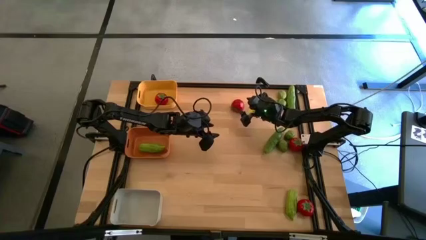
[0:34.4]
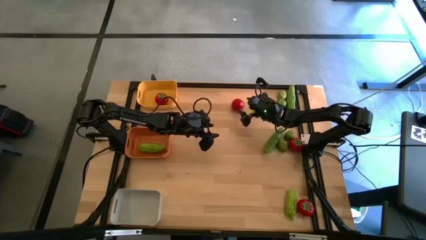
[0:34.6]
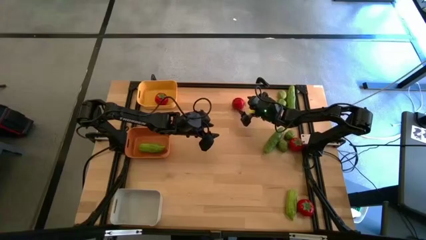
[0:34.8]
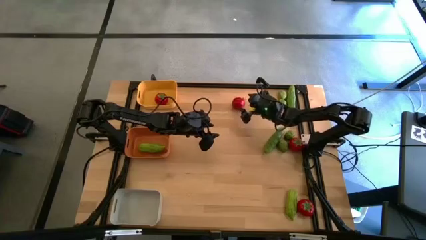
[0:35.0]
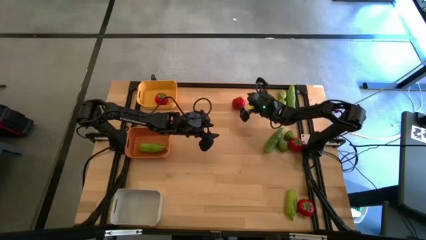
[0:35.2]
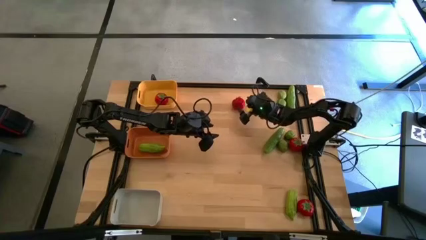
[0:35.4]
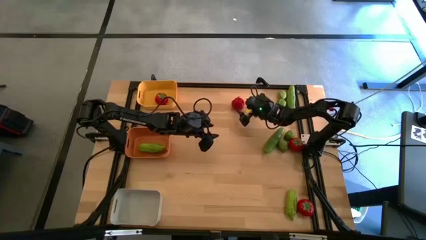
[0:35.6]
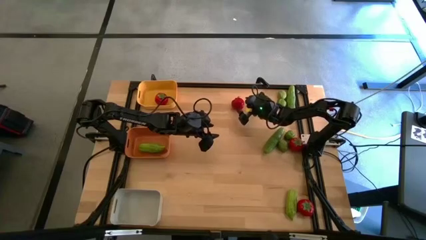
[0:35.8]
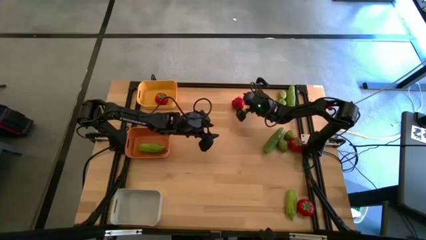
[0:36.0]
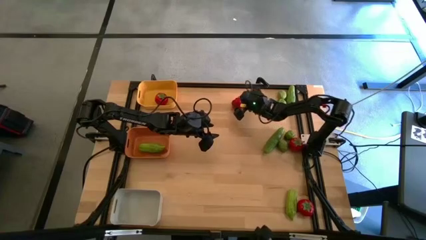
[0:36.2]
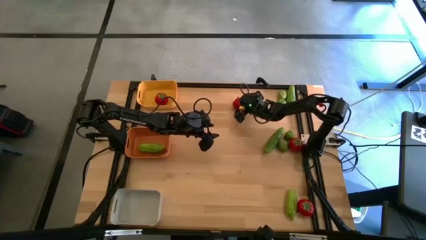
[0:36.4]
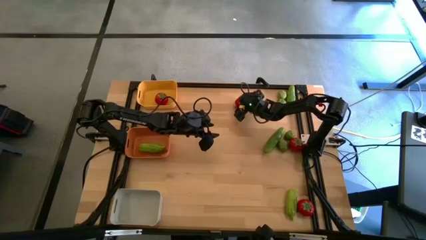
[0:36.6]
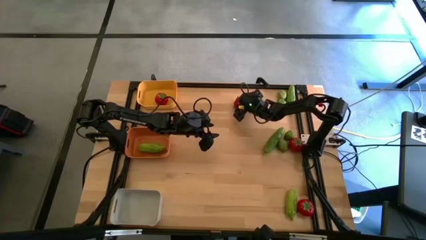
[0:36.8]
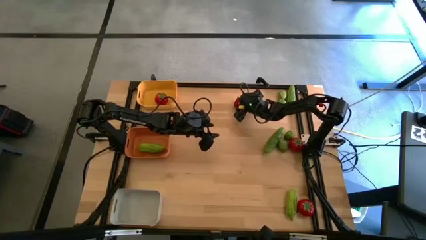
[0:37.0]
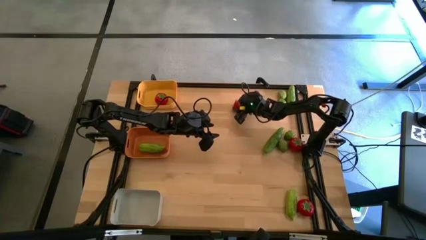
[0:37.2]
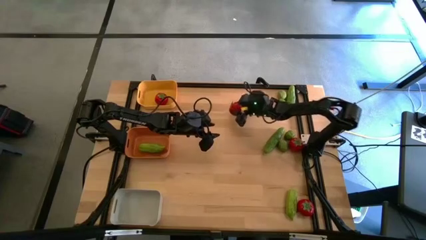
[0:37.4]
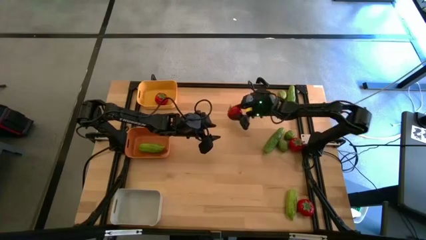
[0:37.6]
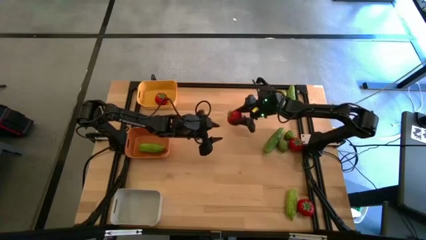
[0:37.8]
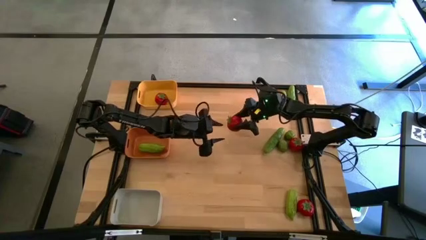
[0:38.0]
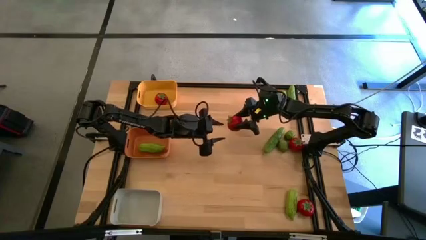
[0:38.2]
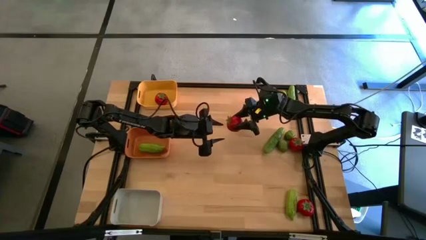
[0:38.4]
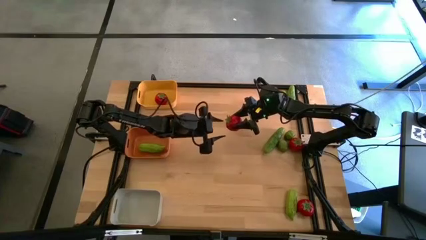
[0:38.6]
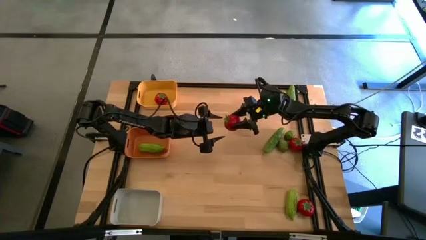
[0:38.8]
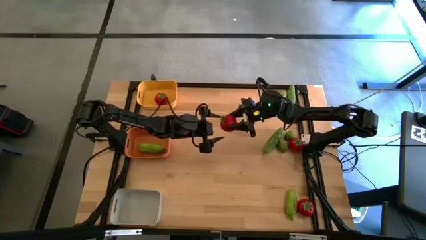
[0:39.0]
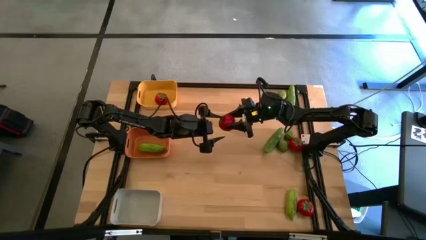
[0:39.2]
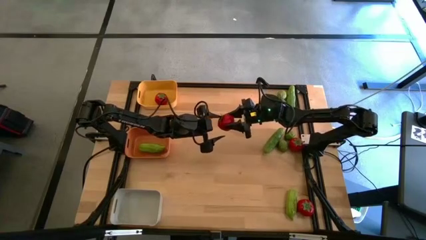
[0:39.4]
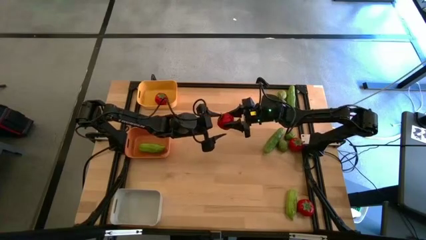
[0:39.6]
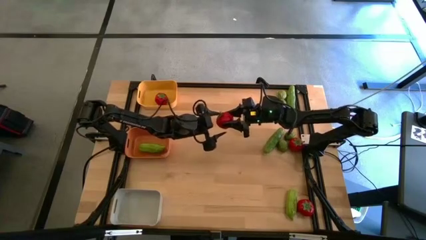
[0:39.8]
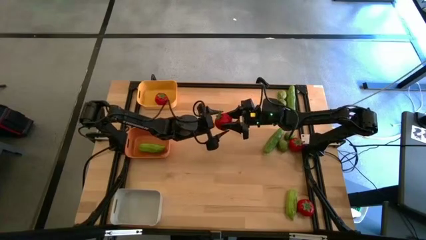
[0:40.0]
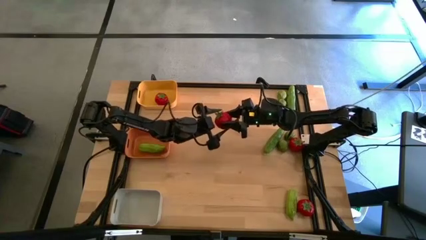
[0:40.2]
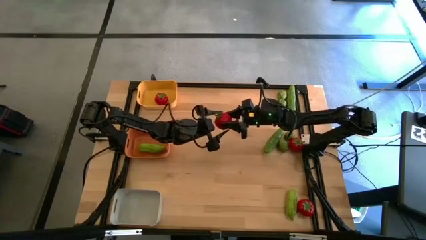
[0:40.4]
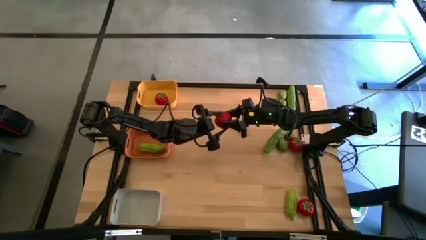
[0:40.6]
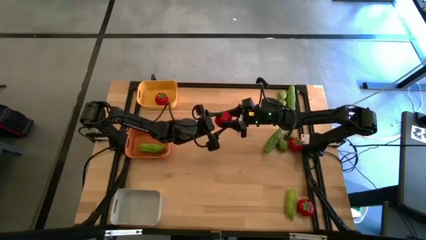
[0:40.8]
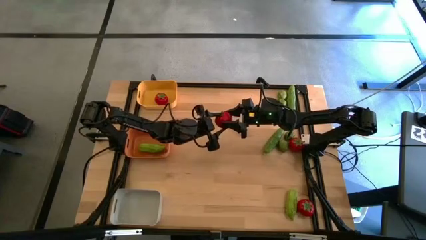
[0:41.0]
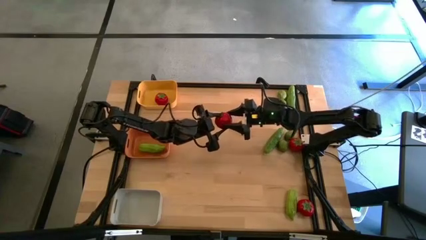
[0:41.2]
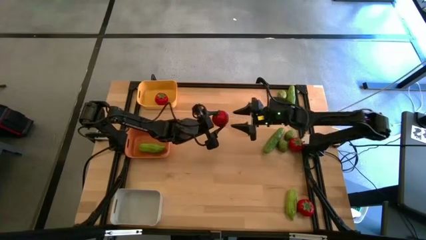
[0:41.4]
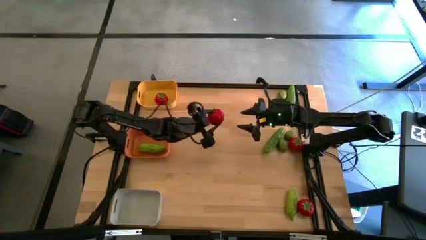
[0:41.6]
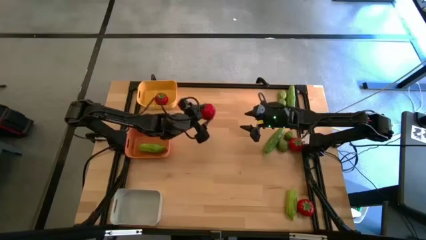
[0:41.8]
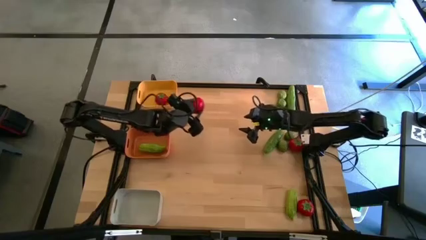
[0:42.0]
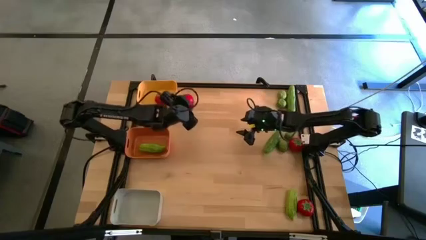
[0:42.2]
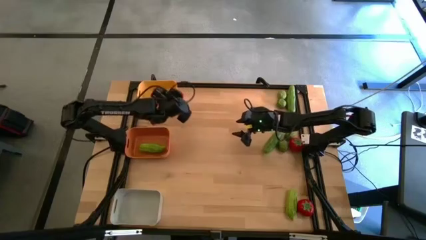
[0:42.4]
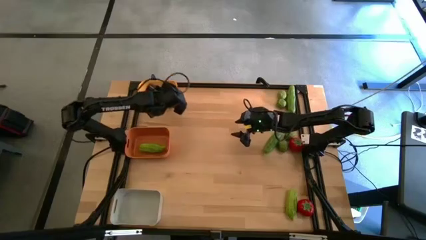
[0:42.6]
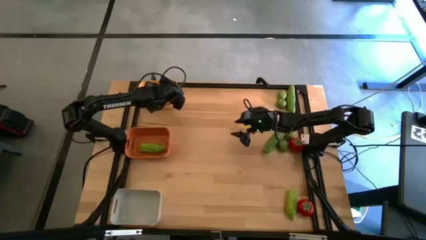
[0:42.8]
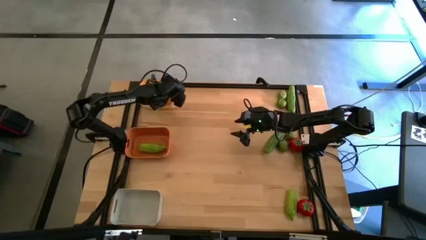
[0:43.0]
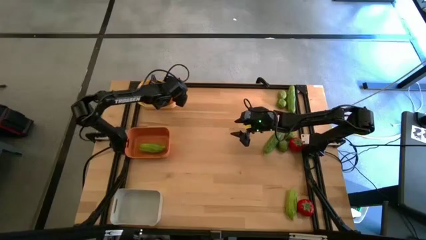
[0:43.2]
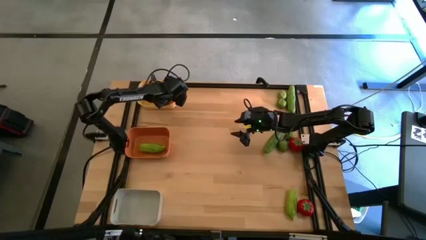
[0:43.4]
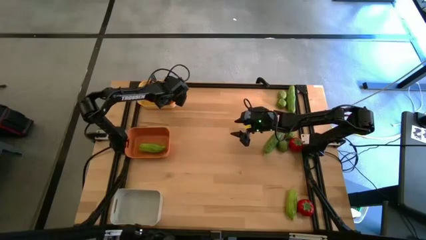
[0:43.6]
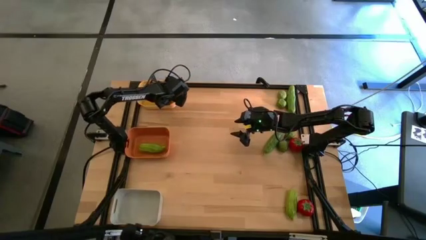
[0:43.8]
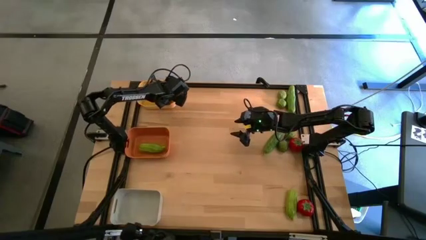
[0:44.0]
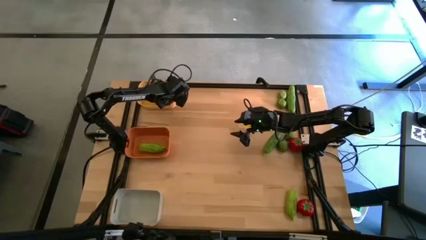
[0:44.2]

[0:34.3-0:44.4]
Task: Sort produce into baskets
Put the tomato into the yellow bin

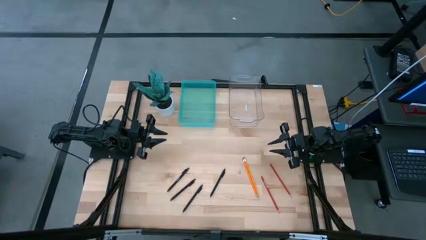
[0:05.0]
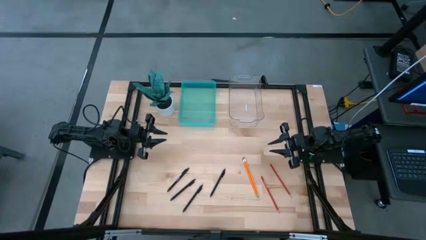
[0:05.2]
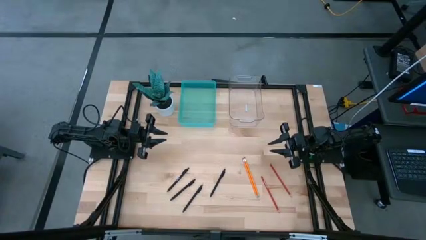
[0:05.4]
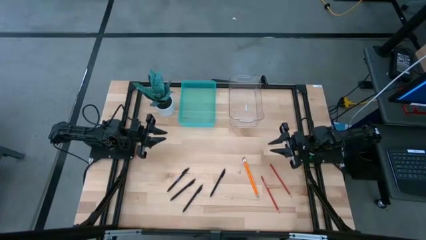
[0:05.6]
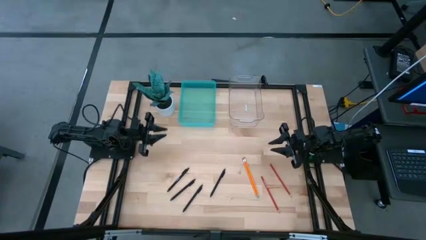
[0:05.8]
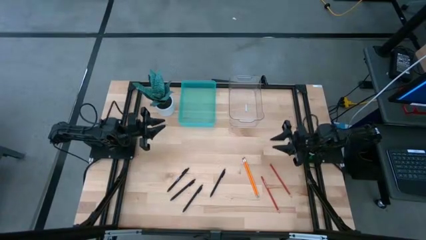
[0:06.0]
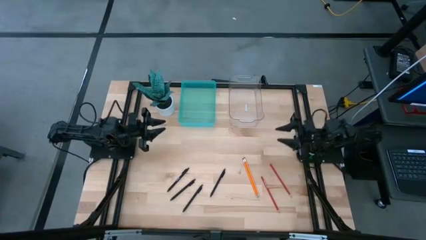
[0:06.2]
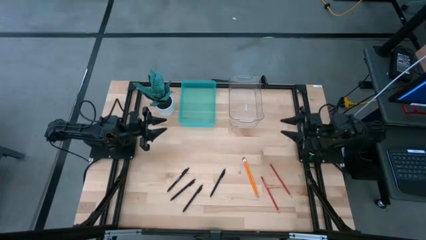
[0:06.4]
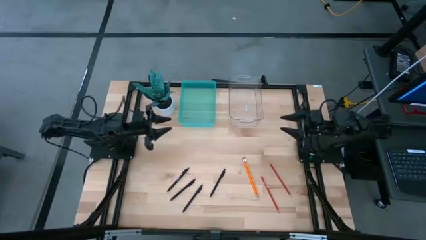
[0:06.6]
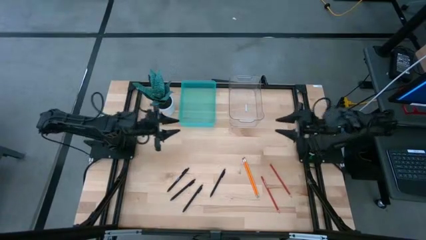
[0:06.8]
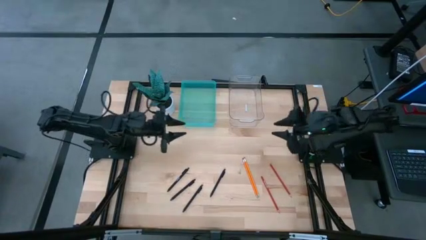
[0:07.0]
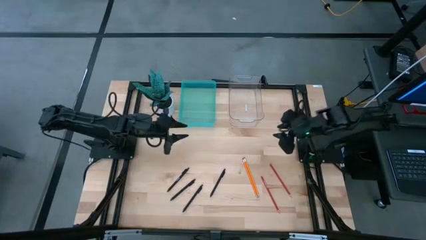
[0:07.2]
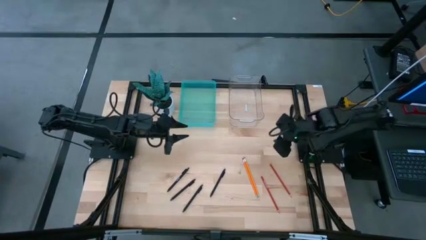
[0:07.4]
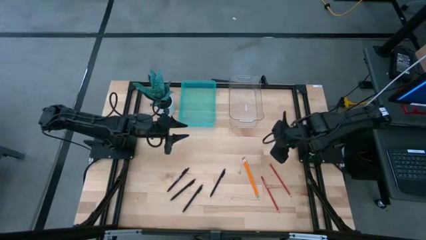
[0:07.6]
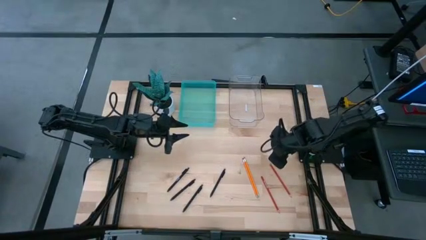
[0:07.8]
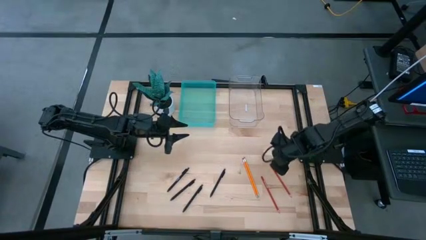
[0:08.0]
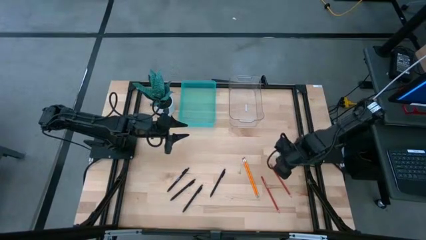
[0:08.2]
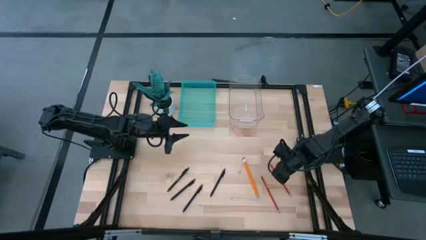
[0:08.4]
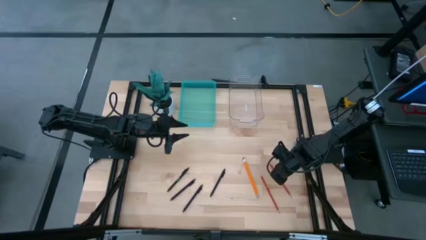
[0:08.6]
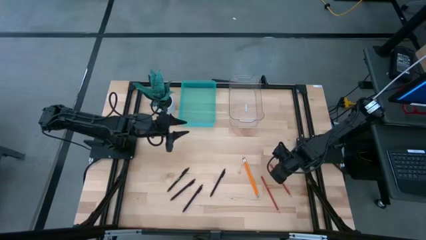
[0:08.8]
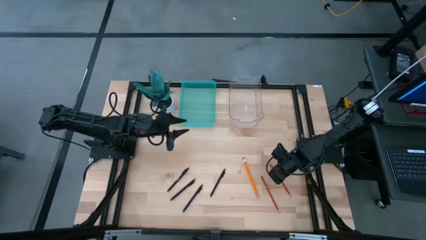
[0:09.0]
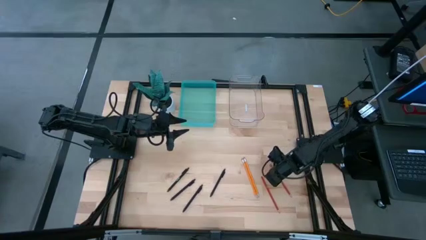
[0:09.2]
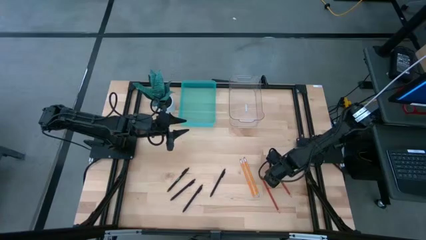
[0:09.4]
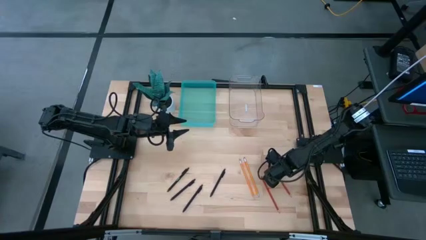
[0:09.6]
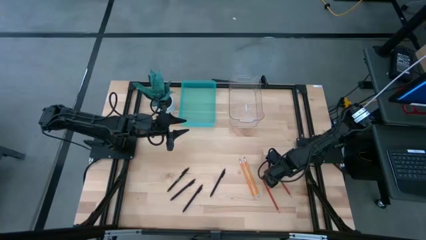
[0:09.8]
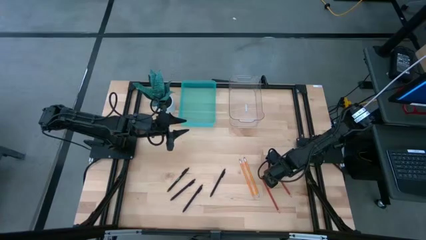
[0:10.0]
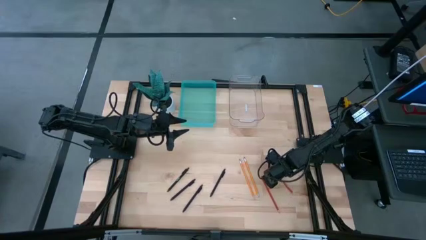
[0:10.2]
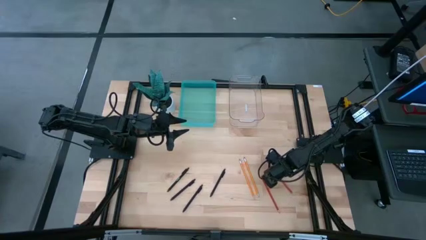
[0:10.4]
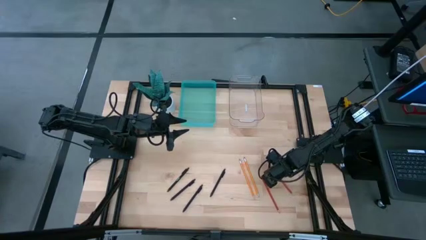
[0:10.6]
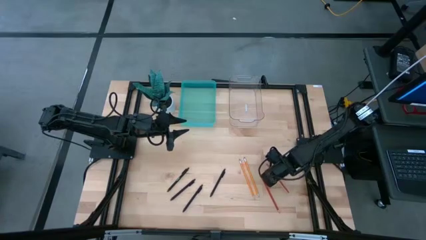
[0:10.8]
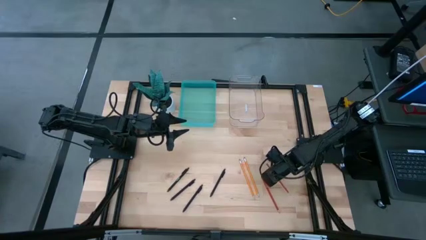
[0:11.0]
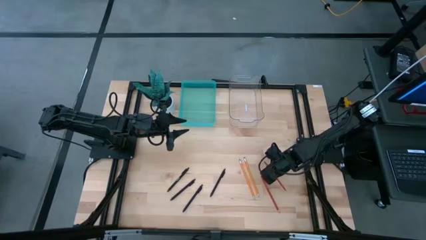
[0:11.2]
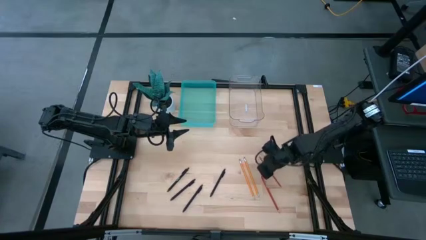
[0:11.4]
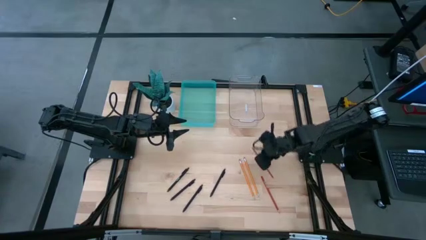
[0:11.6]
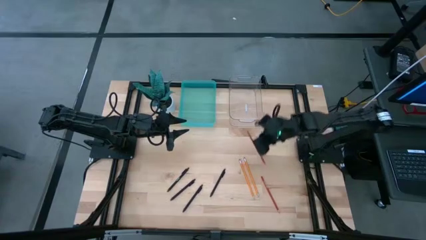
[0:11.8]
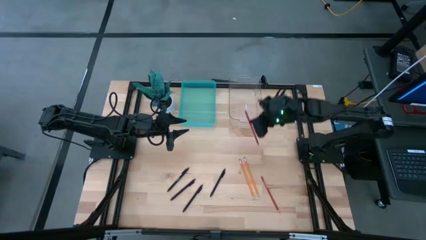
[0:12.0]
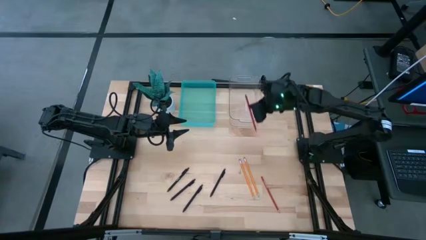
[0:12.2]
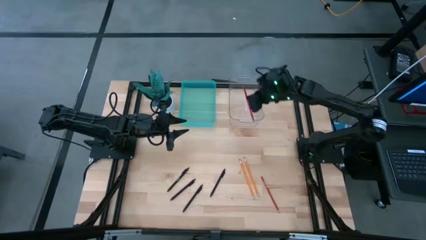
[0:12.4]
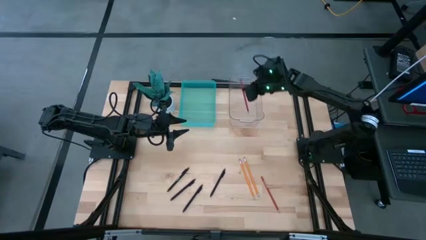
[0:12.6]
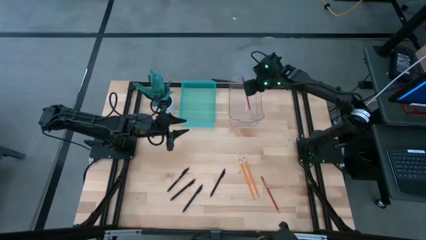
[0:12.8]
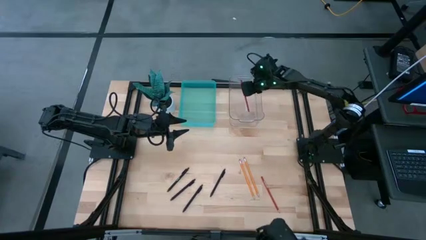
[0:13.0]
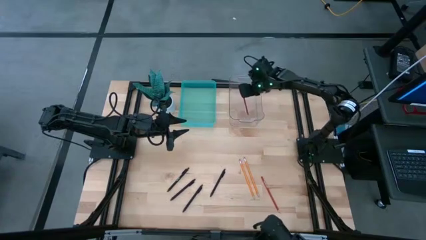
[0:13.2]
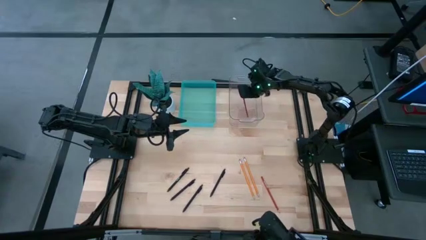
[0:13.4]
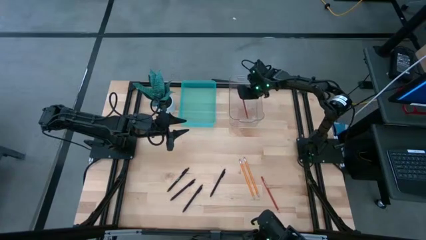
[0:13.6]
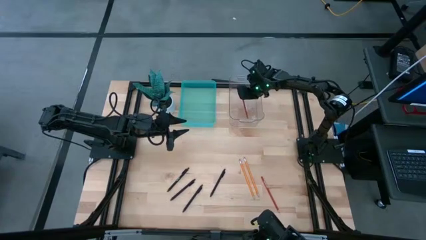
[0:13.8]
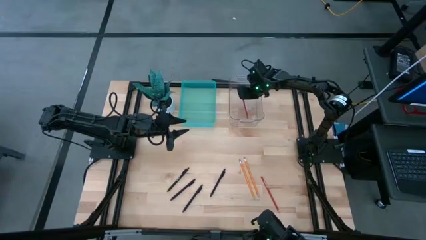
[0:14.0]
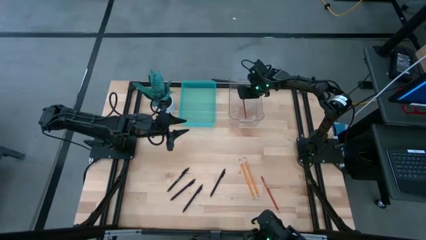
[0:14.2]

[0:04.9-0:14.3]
Task: Sort pens & pencils
Put the red pencil into the transparent bin
